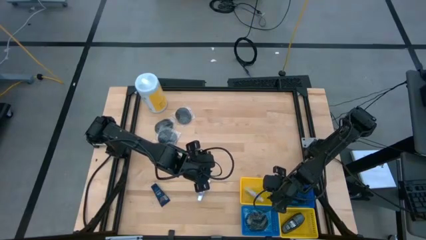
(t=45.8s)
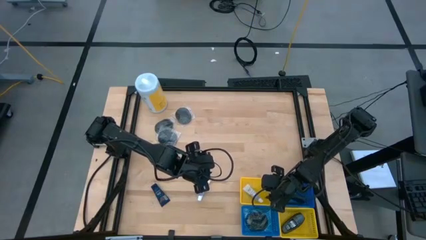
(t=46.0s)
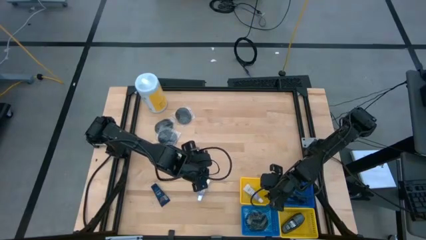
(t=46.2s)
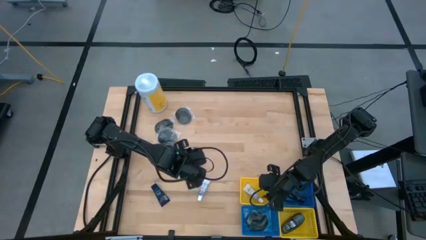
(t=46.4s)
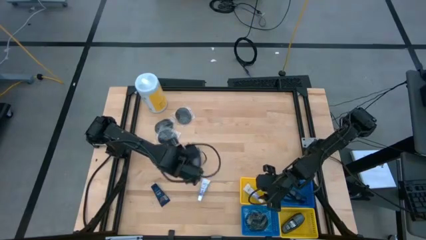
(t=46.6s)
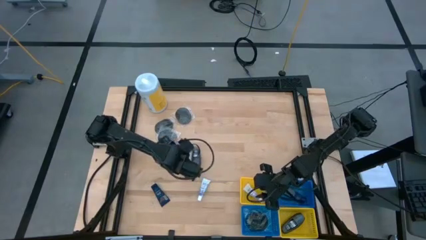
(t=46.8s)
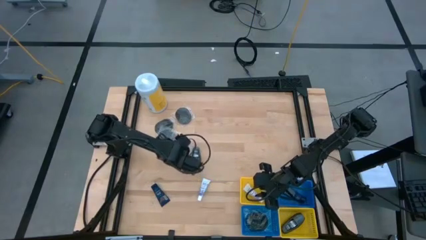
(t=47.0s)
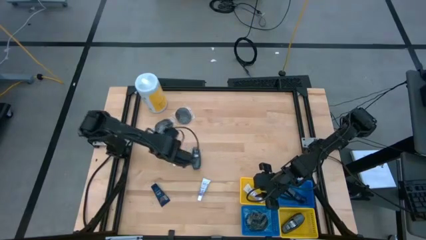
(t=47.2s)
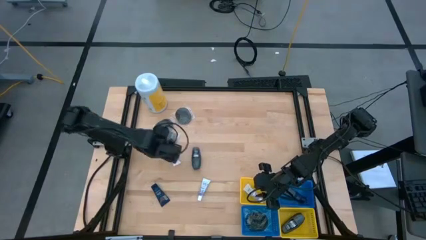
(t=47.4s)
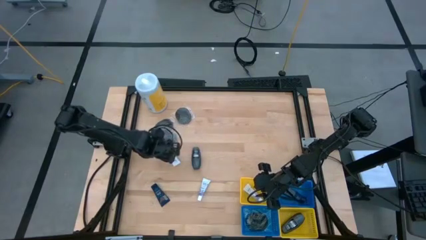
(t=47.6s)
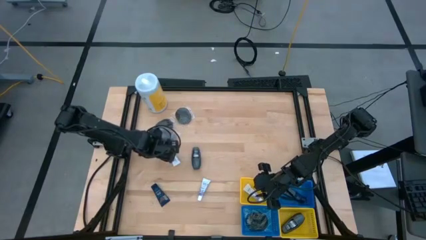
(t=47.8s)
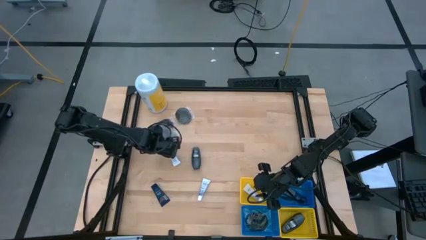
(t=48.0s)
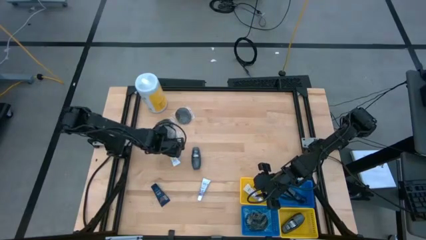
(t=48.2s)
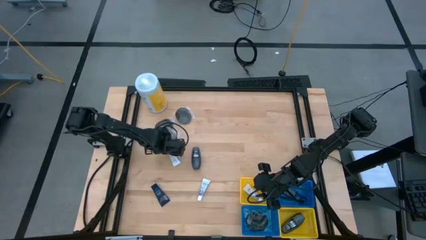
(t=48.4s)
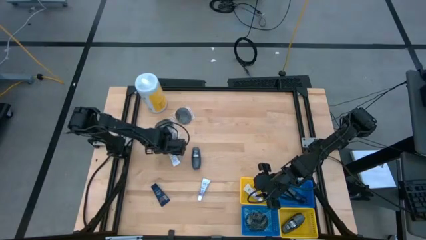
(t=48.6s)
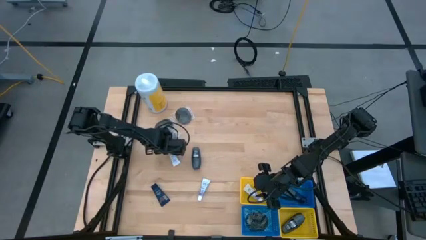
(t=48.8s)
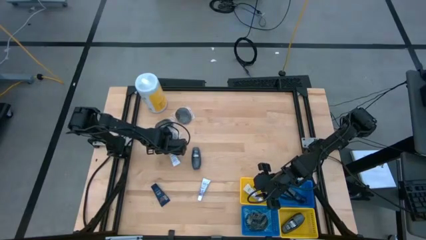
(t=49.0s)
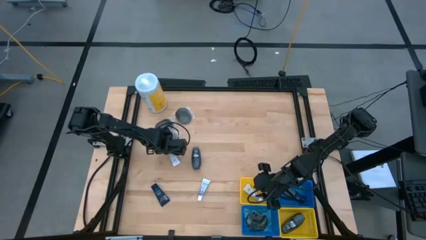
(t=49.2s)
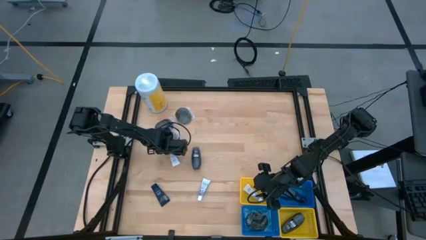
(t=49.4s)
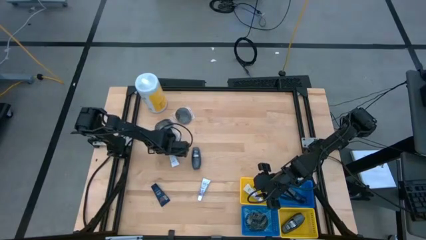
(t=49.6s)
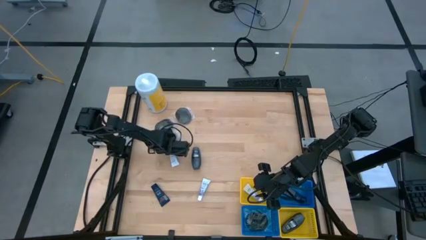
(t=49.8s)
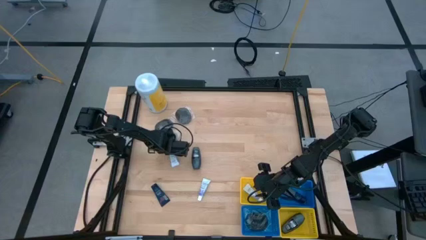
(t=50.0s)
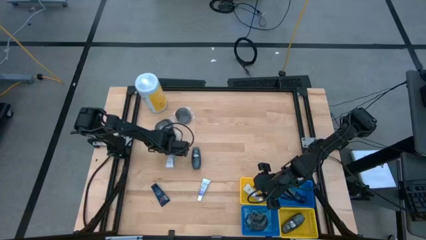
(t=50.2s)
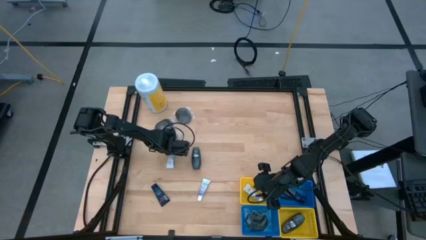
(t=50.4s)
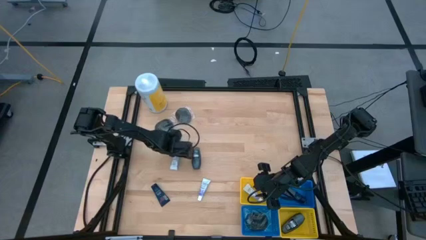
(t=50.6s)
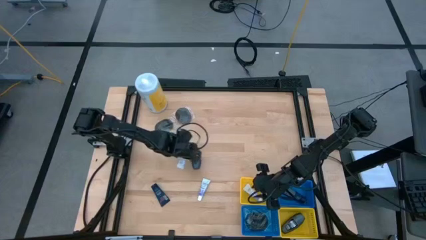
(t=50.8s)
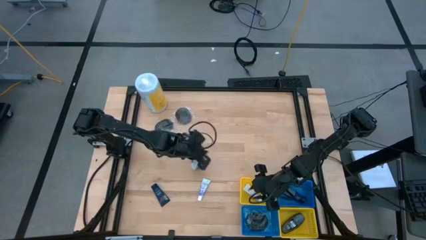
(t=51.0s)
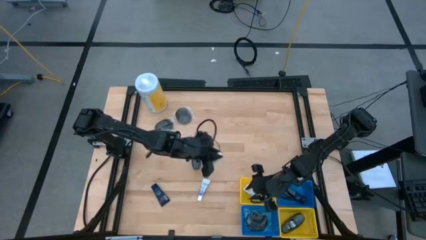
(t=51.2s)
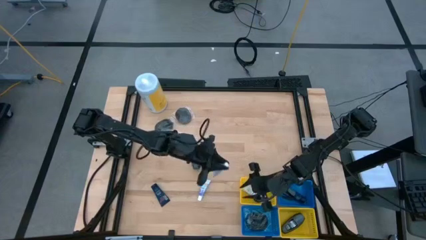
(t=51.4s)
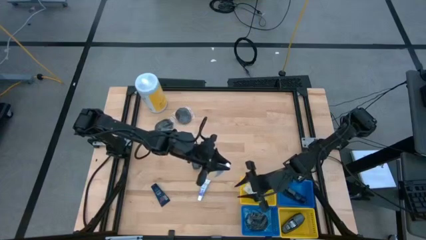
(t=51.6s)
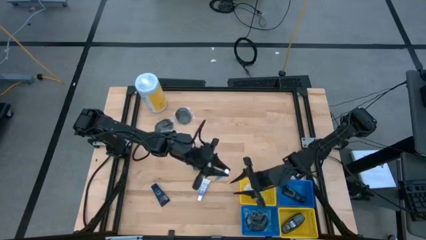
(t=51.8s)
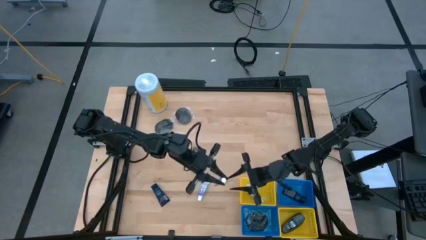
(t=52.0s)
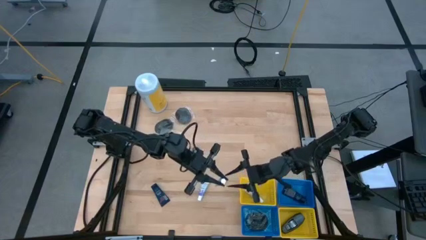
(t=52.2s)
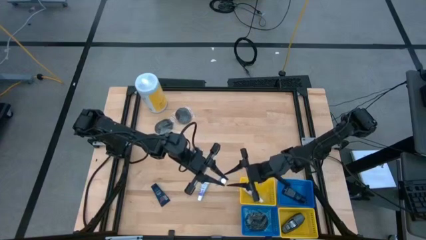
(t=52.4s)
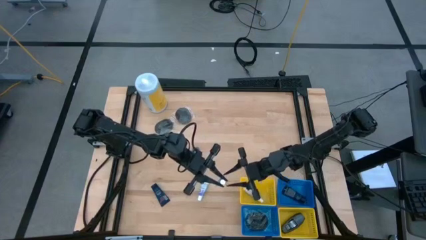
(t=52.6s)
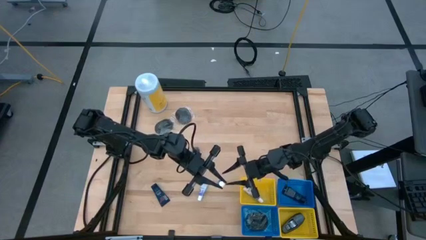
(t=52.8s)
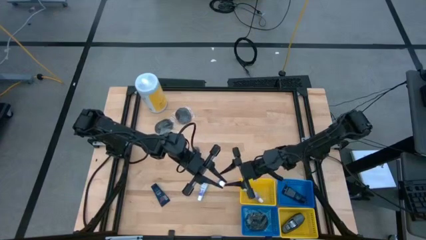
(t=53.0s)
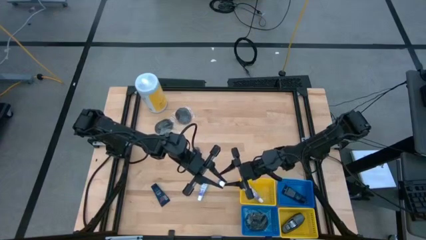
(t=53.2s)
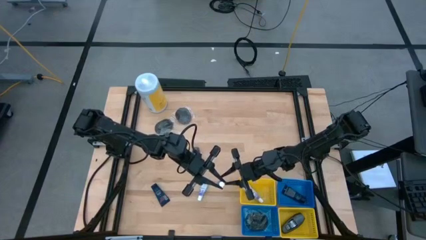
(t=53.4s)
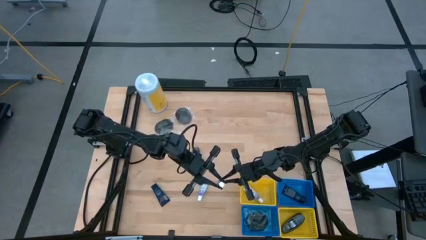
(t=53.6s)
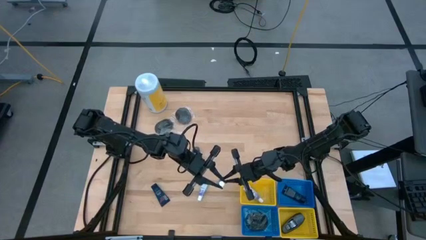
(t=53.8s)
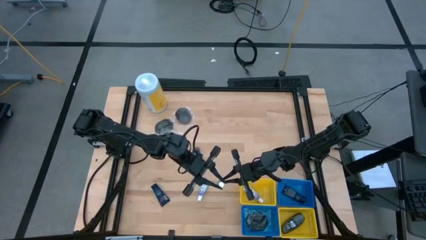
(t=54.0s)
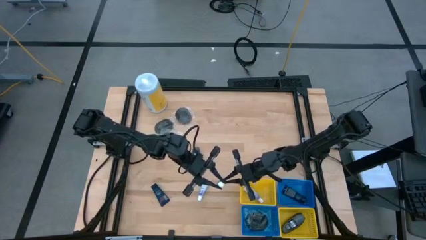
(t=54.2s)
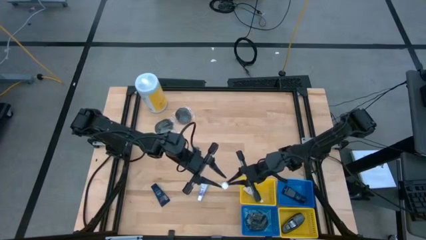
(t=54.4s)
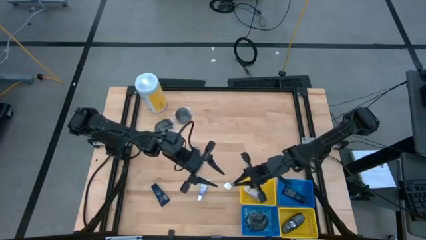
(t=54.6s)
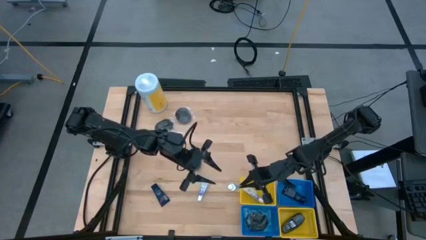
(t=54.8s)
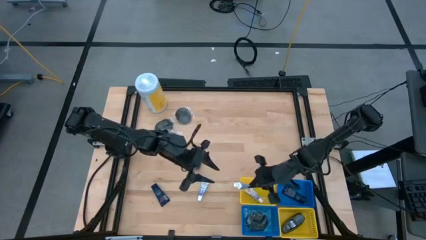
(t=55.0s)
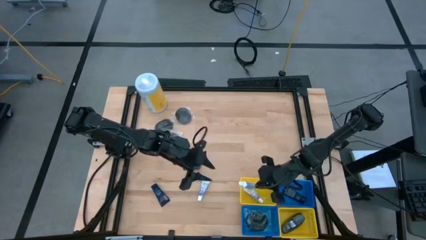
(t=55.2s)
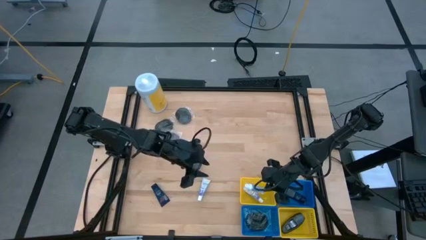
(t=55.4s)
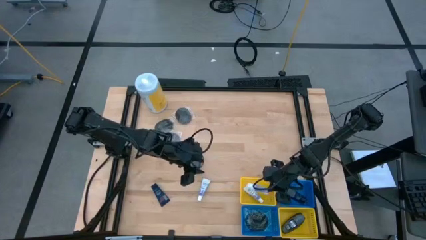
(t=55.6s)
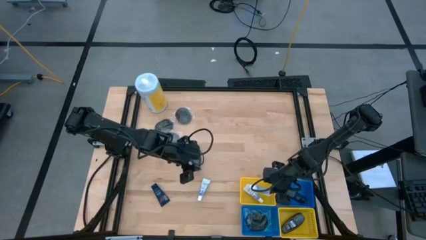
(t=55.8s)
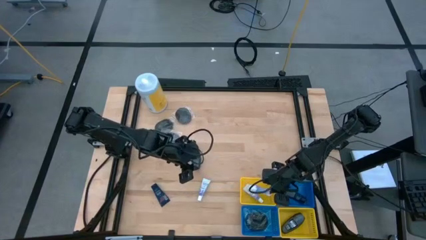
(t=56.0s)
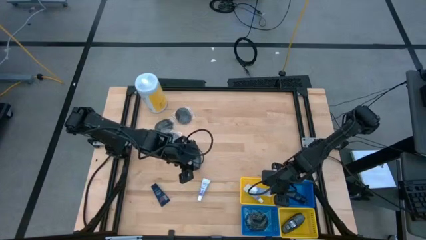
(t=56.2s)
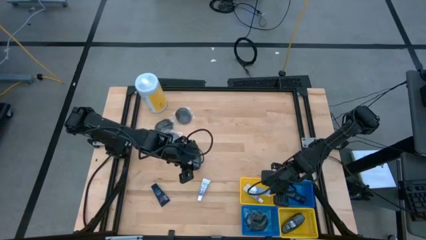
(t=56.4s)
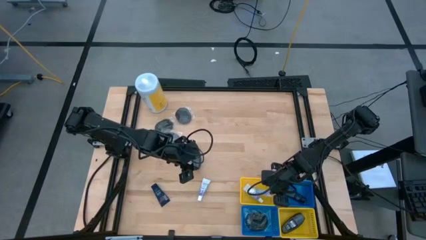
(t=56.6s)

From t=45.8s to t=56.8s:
Task: Pick & Place Travel size toiletries
Put the white toothpaste into the top yellow bin
